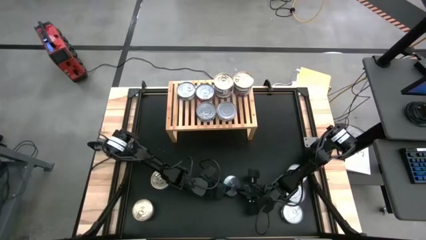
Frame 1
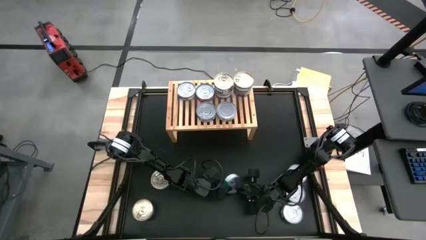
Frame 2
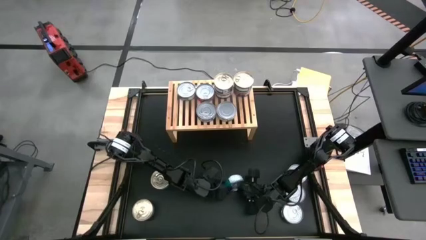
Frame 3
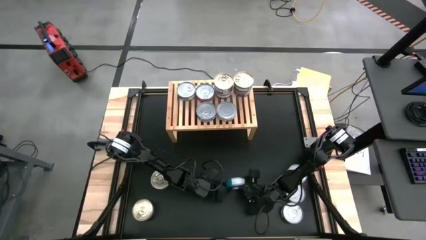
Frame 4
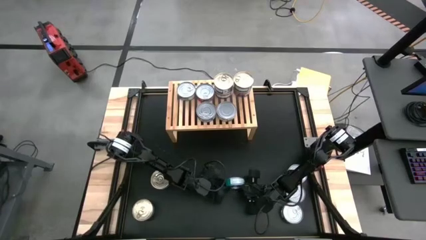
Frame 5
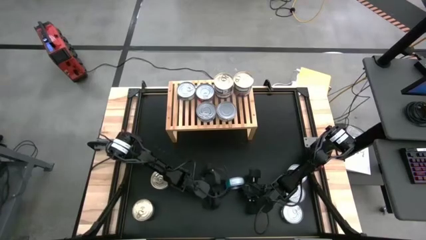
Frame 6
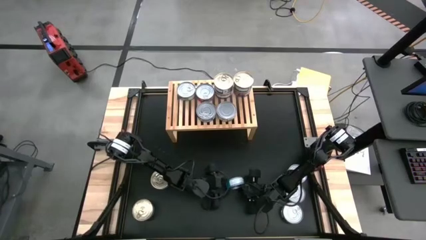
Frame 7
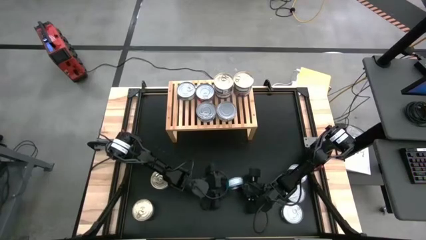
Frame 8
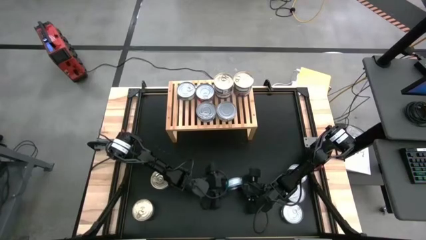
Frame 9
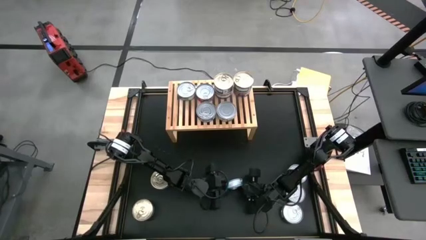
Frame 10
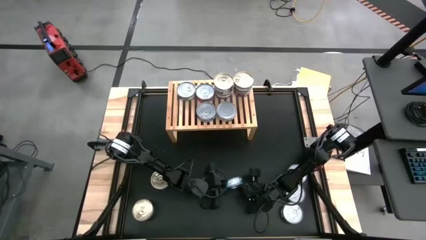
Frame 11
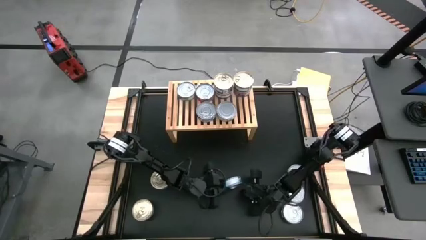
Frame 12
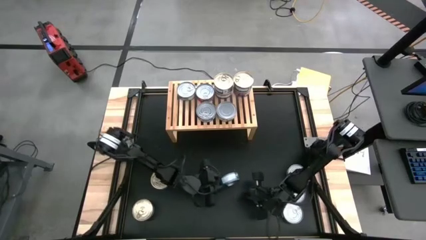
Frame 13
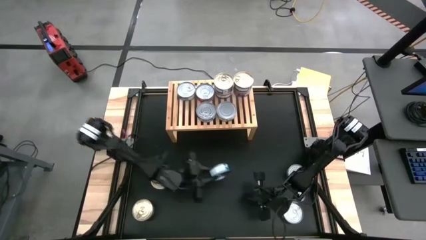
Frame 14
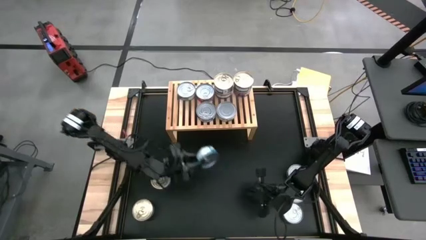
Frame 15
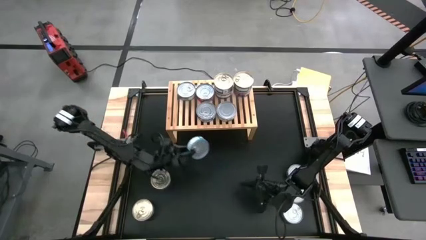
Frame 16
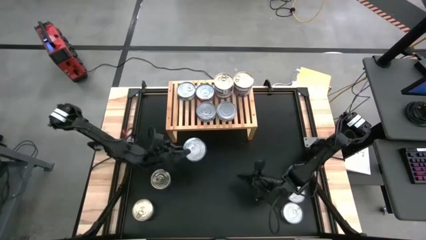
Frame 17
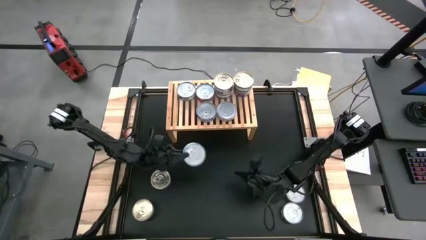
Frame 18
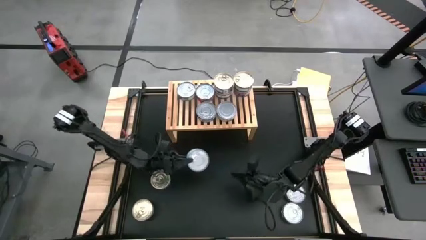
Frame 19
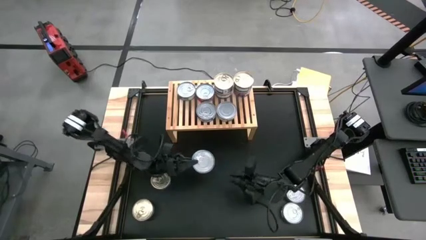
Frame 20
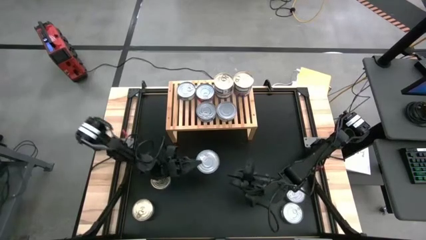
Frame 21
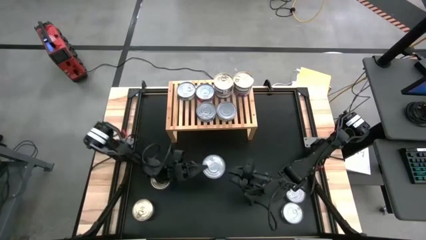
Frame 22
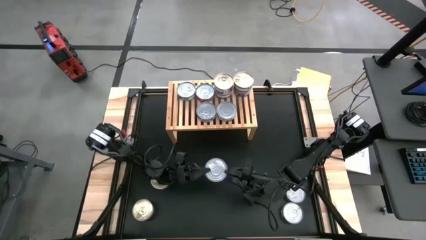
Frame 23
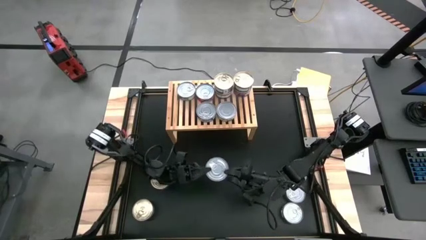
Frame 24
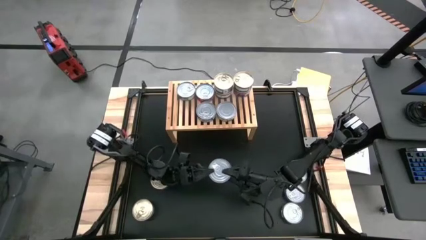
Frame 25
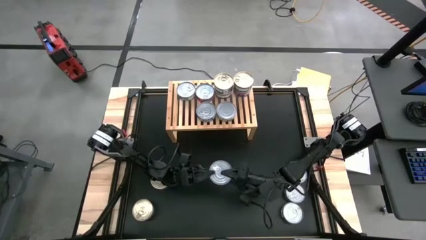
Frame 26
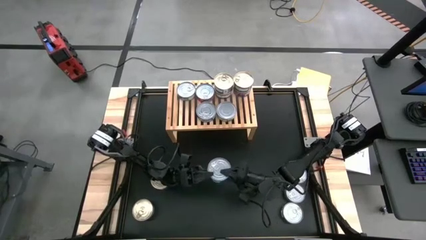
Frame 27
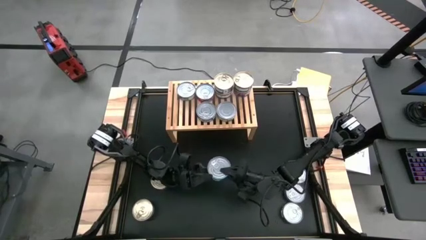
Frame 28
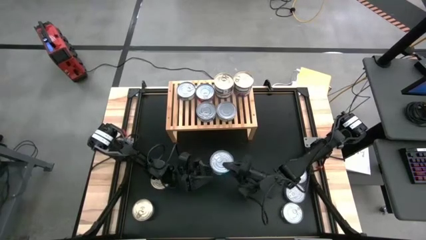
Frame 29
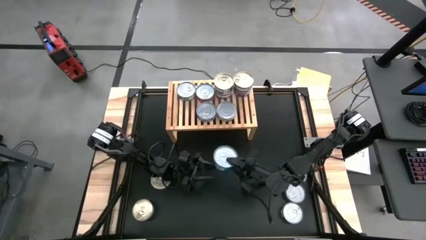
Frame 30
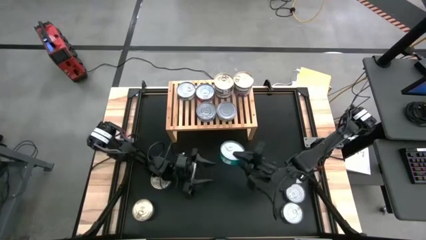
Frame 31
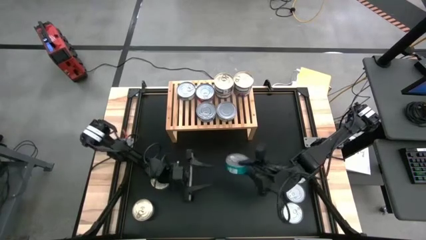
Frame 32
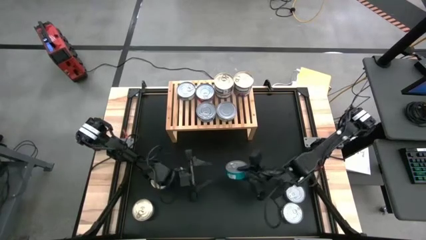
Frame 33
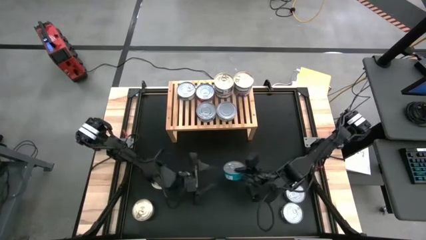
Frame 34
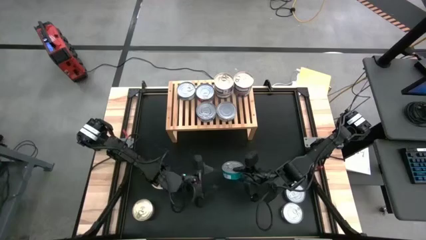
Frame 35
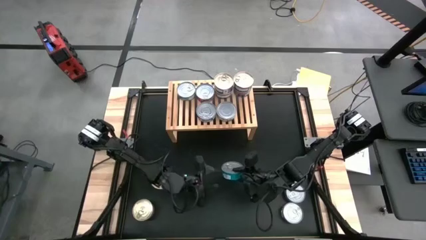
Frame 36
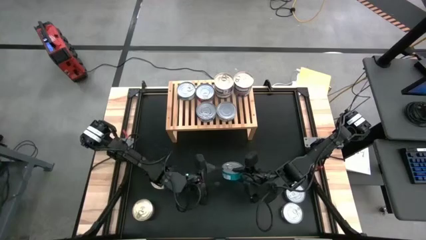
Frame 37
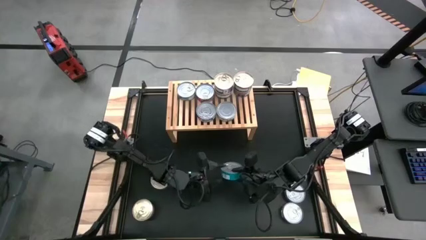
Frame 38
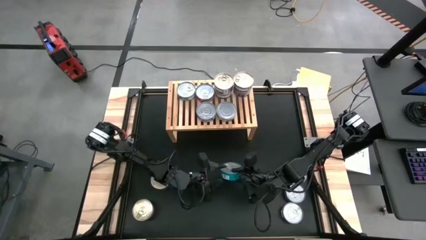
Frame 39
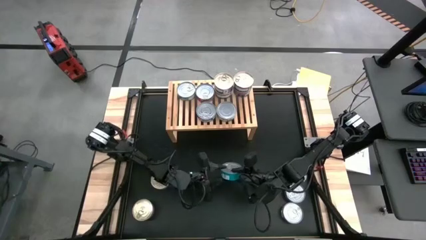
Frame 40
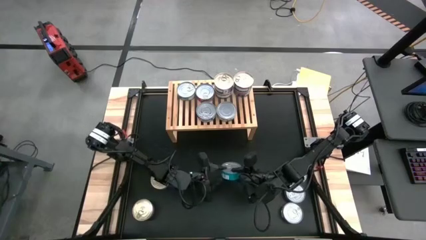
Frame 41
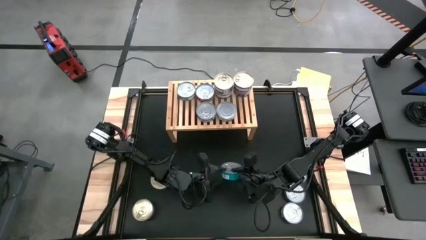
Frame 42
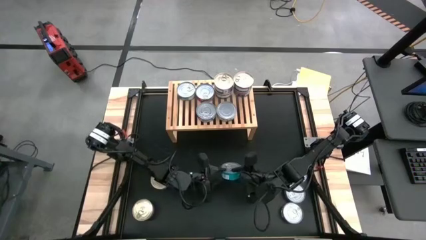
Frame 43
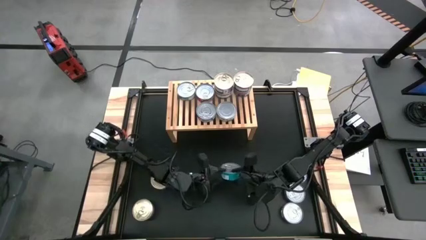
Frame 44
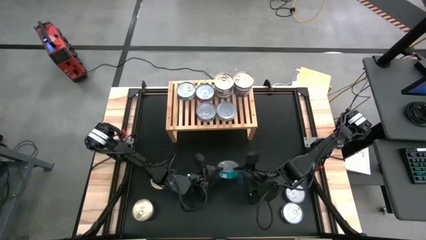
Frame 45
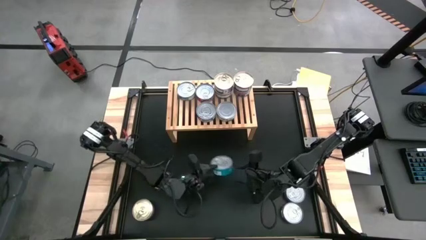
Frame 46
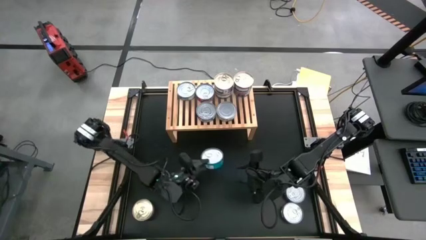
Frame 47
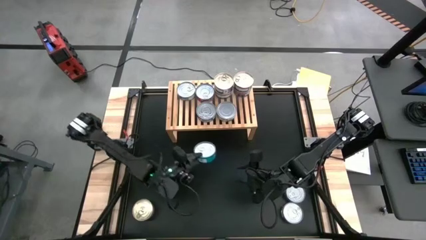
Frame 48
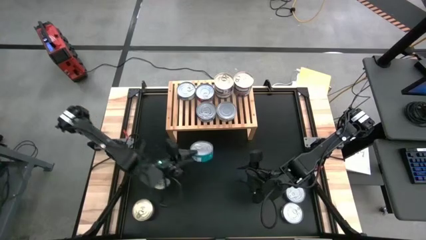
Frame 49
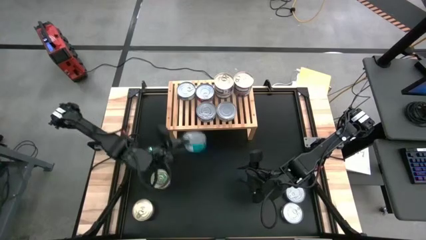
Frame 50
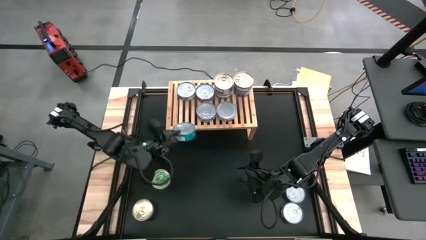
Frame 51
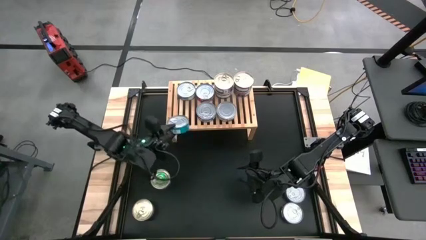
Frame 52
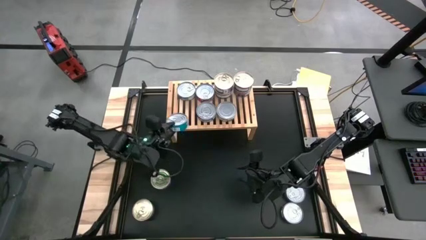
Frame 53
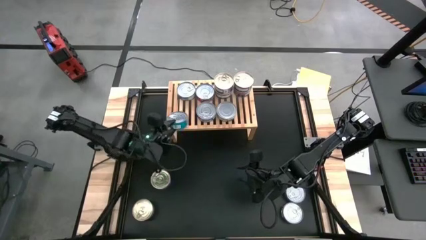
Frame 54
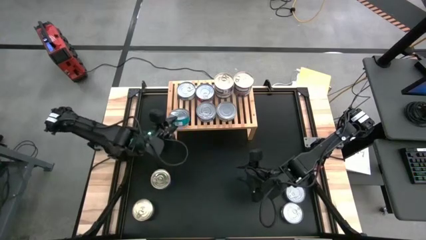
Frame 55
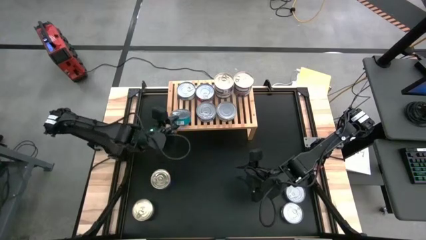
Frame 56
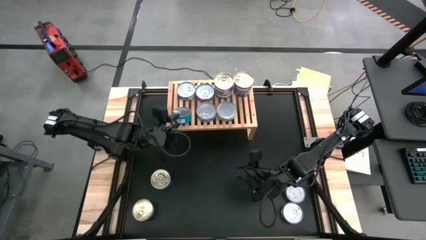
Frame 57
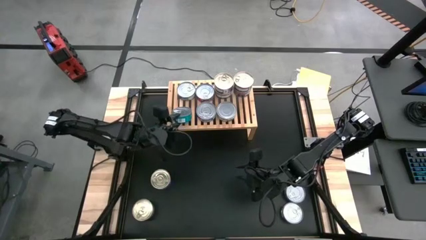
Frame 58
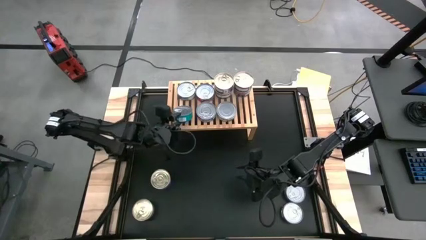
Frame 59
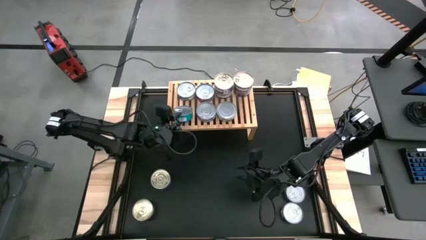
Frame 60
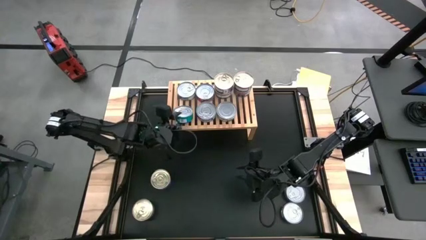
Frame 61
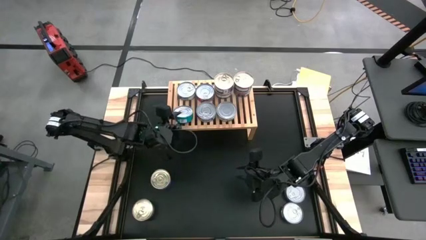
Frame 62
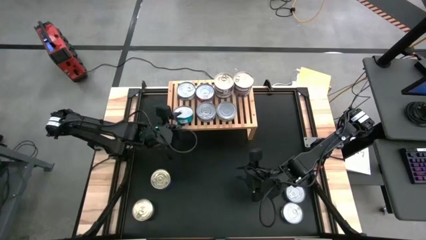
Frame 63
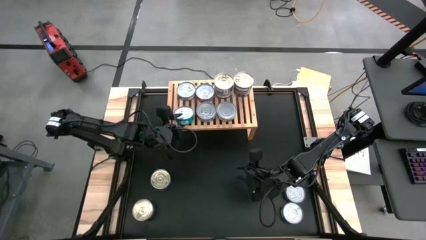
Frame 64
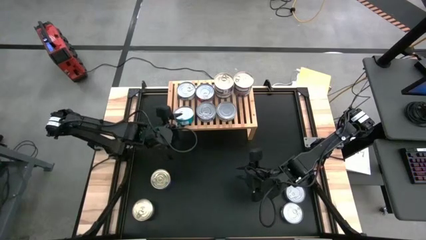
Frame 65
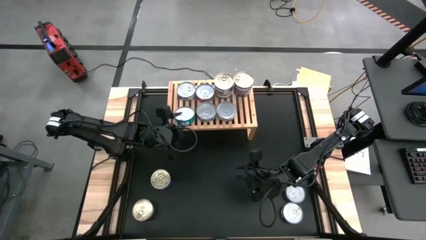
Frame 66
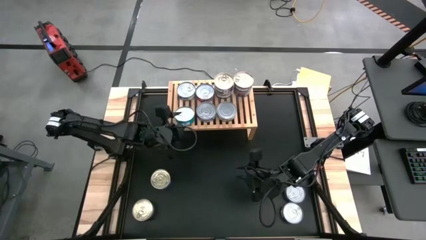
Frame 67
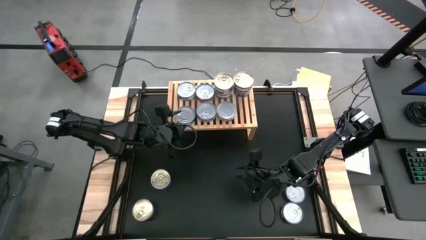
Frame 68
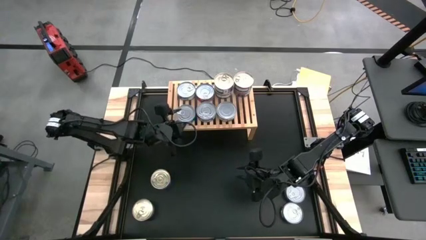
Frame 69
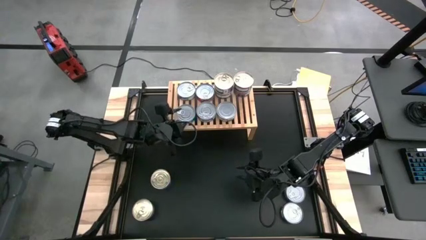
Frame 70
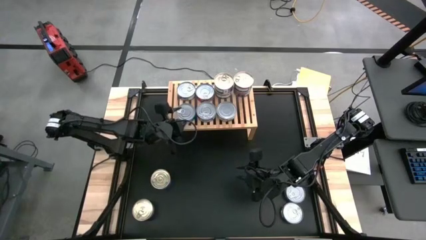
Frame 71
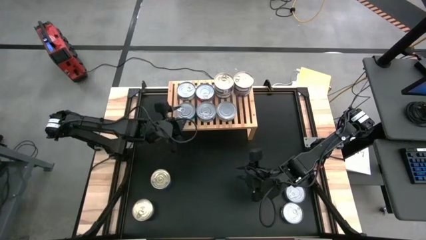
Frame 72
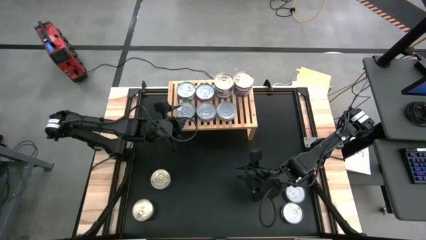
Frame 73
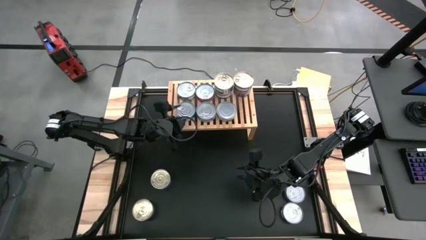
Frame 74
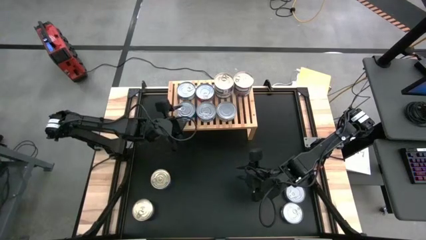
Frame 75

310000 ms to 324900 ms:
Task: Stack canned seafood by type on shelf
Put the light green tuna can on the shelf aligned with the other green tuna can
